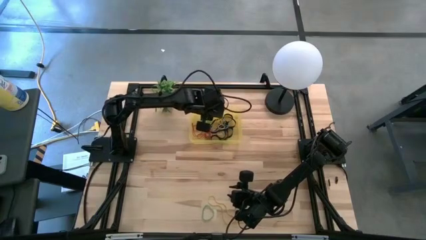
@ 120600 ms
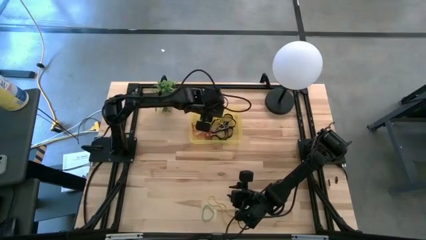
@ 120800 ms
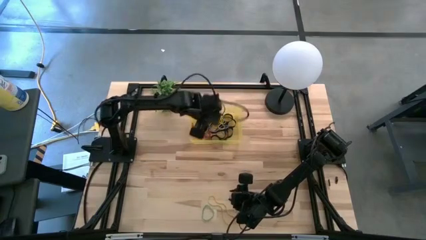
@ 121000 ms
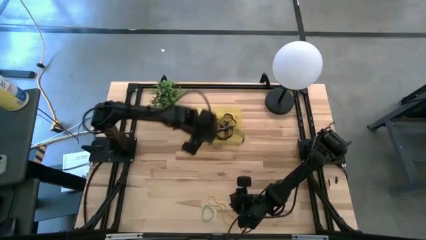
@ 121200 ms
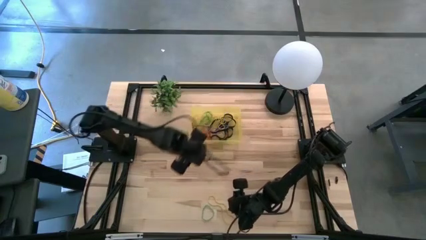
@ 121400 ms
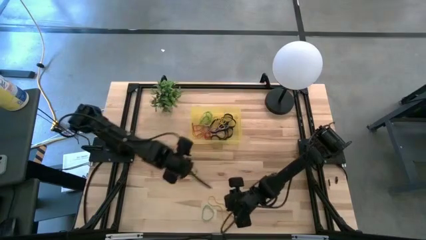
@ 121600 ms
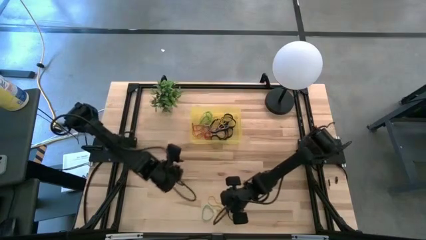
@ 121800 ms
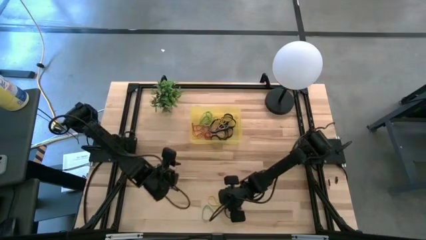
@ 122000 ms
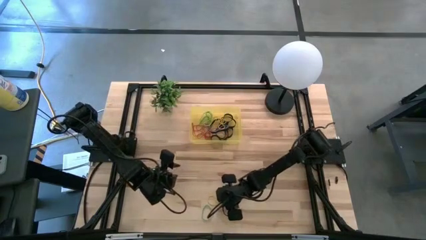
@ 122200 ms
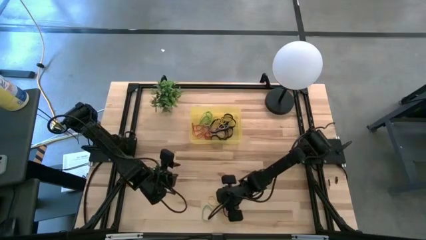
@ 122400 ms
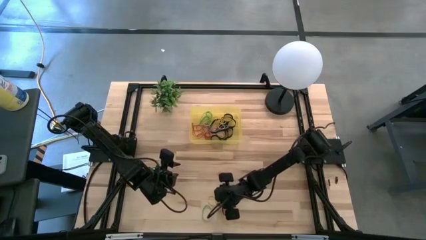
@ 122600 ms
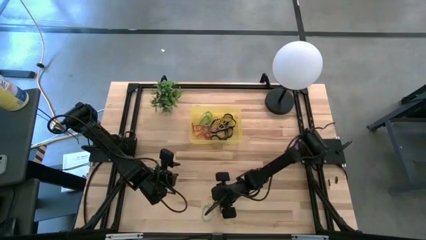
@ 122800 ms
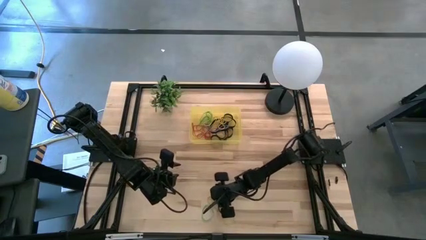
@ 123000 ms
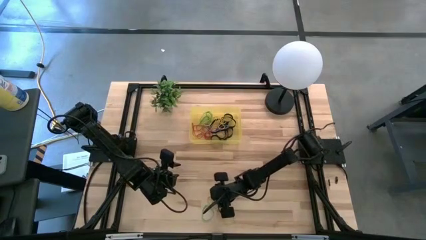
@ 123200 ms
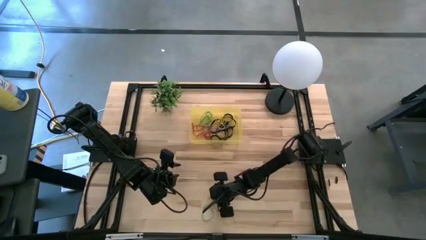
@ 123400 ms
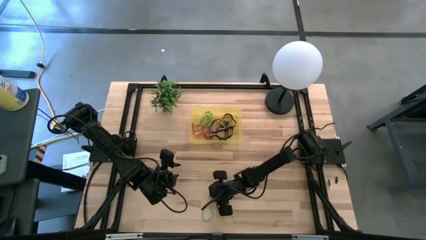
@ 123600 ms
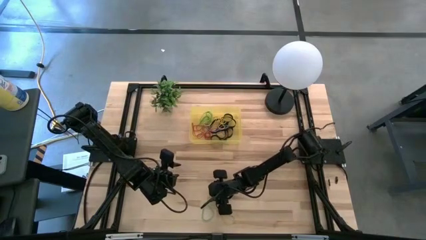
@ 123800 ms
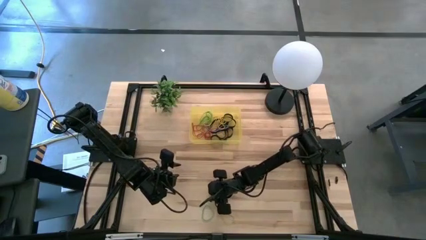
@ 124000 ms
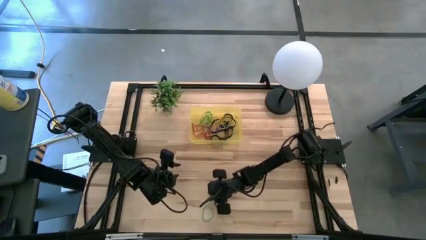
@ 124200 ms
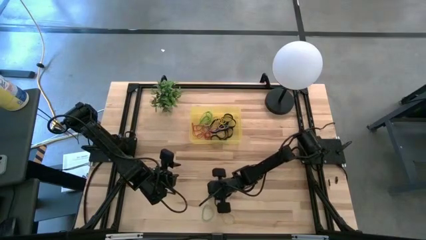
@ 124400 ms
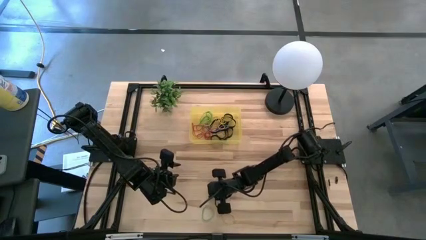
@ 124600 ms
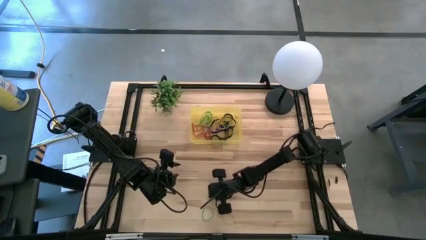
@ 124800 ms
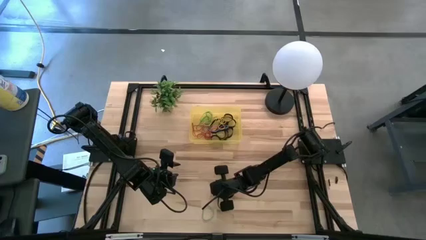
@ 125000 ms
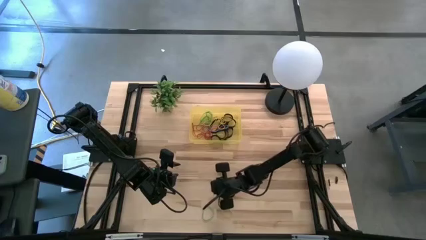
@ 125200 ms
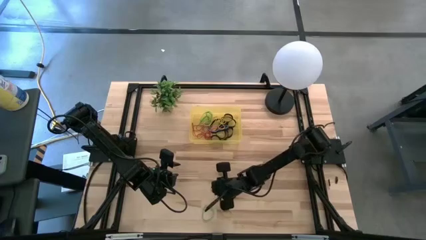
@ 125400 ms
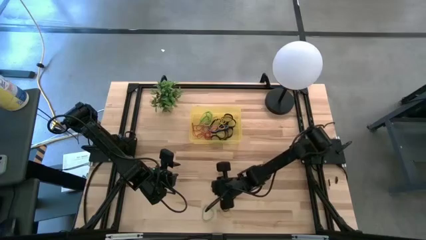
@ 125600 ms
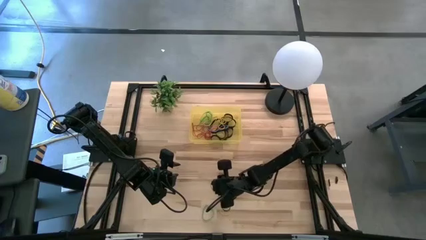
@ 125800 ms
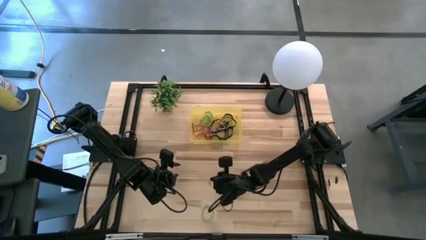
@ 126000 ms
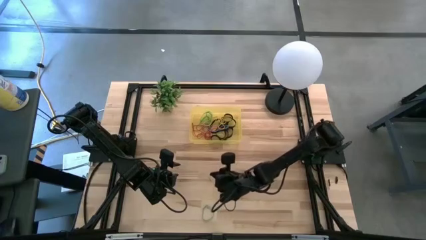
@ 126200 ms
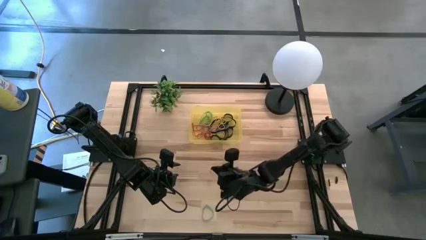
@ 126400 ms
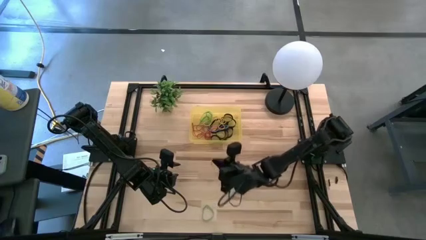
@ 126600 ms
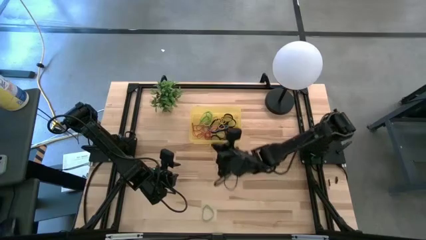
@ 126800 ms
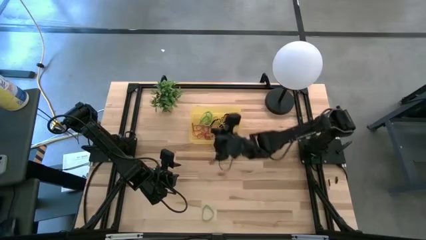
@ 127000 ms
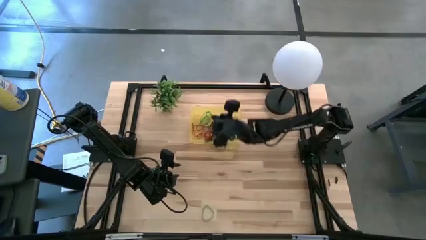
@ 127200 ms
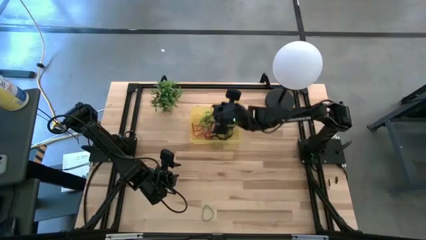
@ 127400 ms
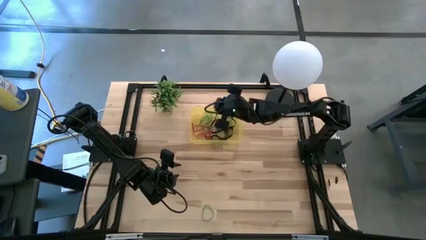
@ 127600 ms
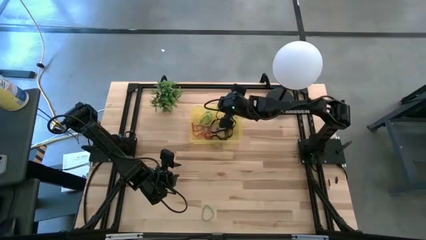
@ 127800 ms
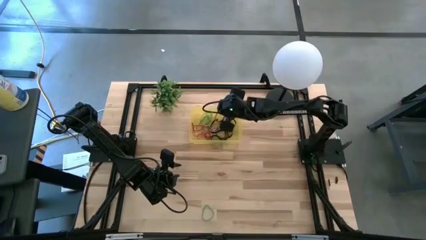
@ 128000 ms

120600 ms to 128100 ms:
Task: Pick and place rubber bands into bin
Put the yellow rubber band into the yellow bin

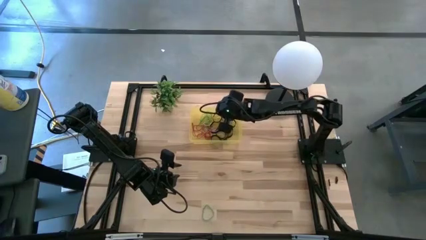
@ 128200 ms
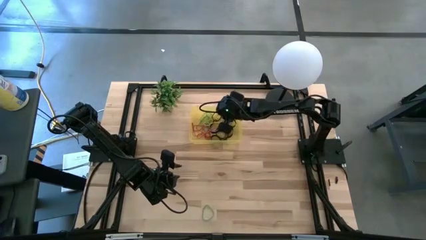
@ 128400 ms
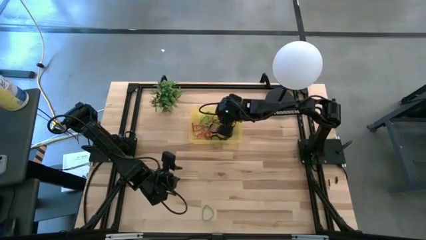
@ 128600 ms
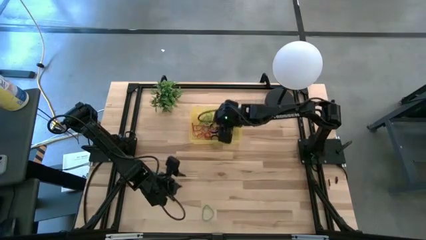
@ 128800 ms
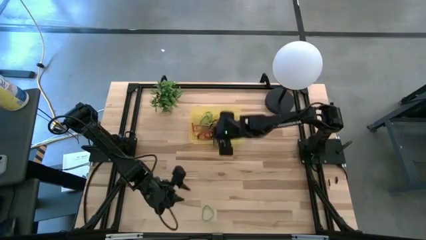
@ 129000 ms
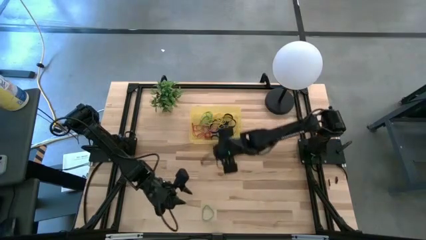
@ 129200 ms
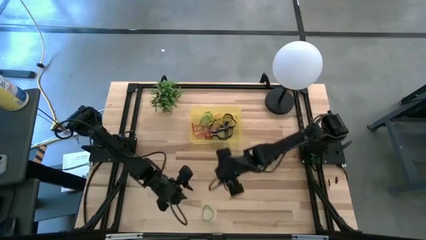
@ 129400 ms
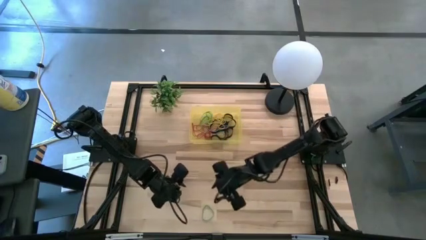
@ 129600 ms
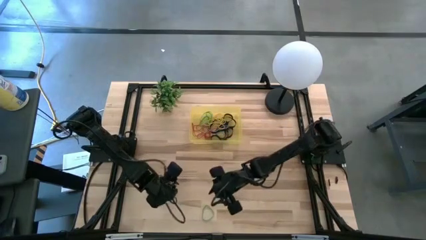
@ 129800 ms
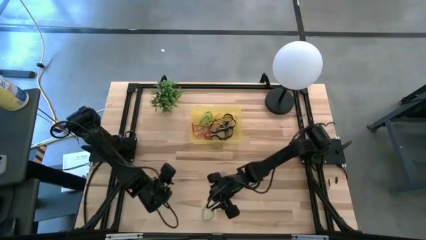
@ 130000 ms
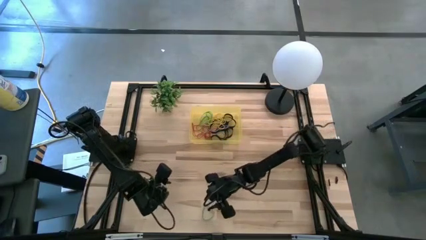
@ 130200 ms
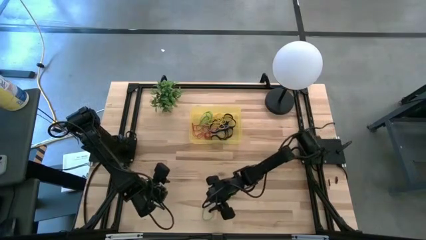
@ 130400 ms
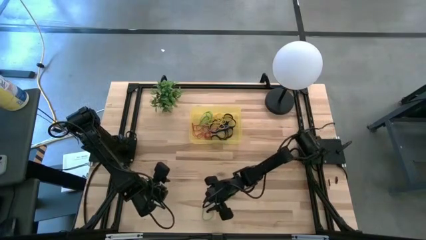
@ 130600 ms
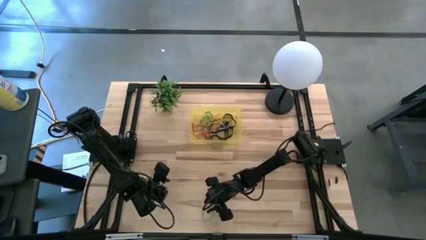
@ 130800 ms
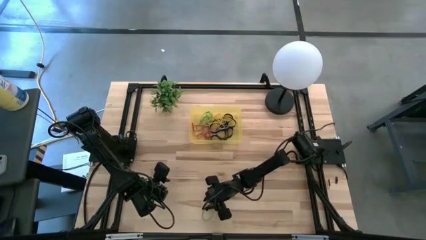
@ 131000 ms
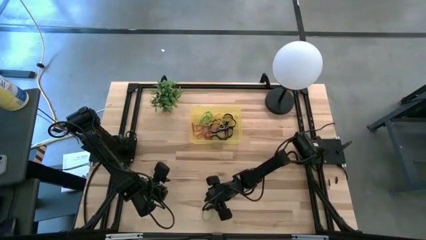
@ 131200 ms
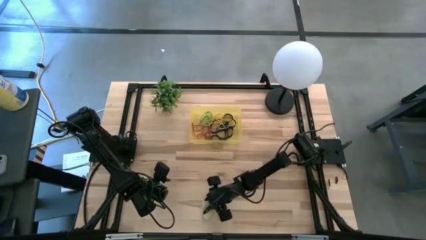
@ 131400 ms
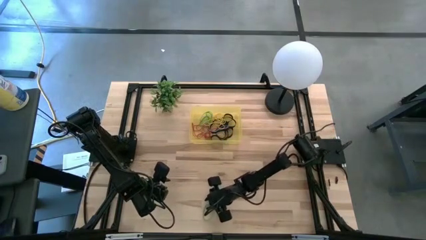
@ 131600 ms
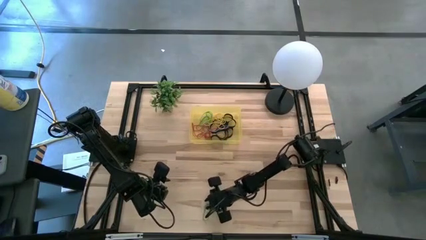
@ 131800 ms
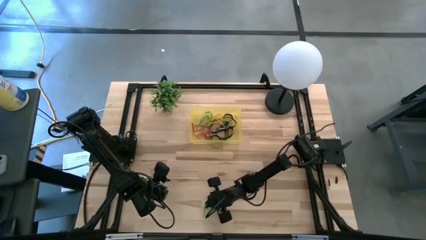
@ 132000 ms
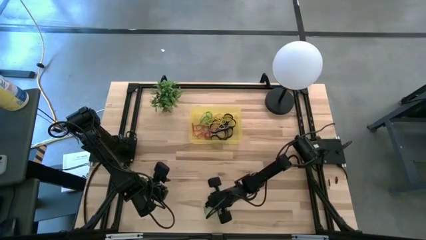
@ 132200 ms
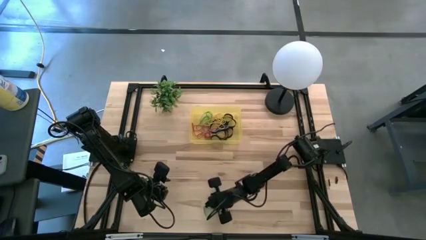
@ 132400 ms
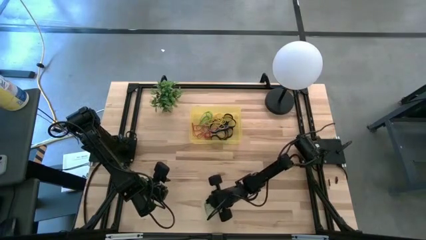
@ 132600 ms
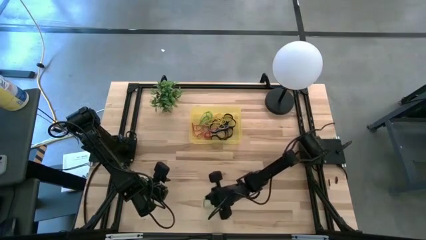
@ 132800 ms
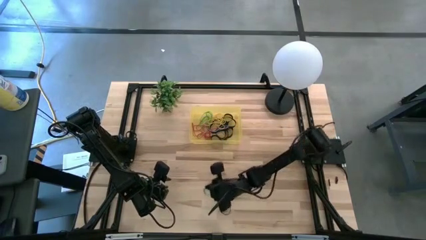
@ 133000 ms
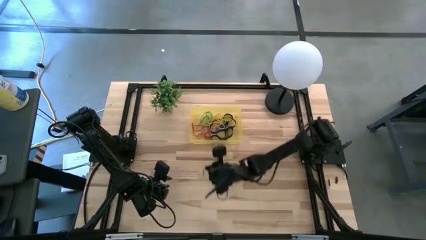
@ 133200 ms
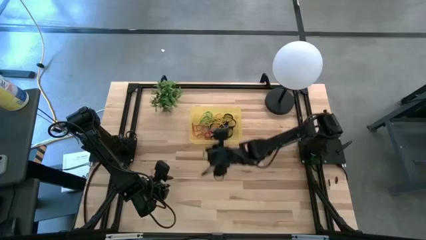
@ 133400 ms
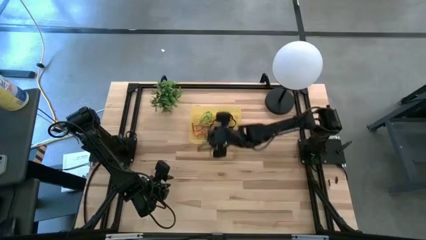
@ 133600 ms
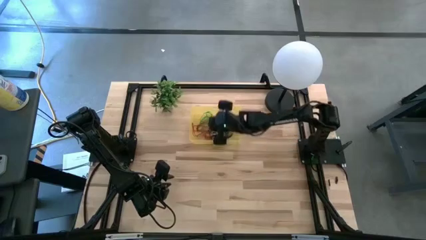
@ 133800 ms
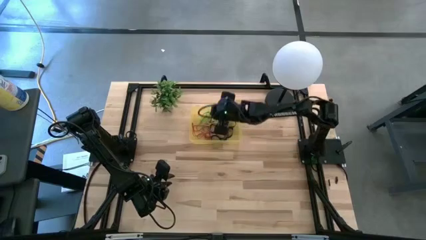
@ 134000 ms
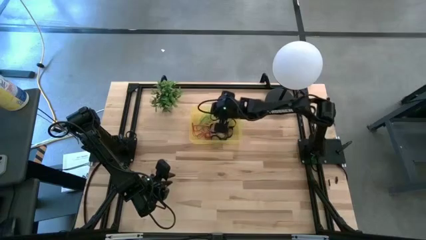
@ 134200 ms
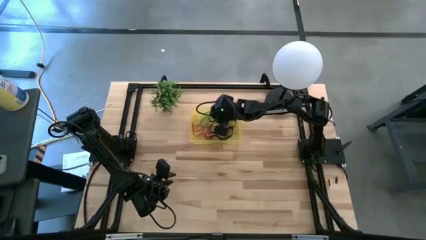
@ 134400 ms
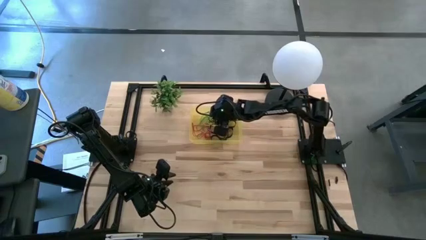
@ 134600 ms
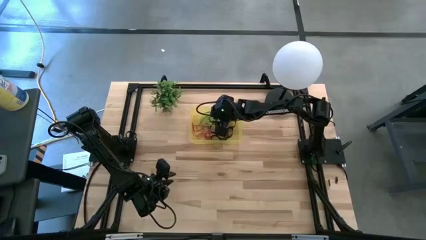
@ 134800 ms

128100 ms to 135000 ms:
Put the green rubber band into the yellow bin

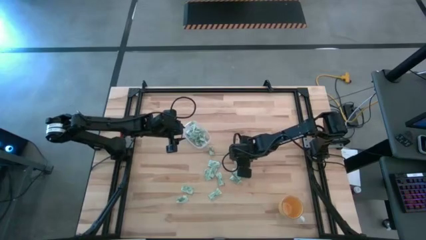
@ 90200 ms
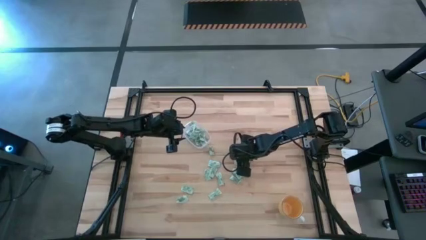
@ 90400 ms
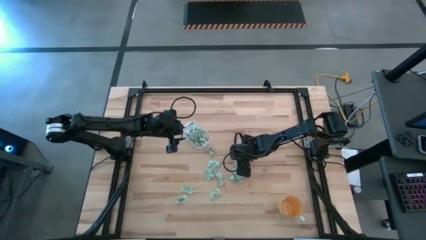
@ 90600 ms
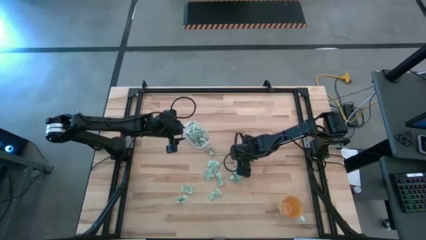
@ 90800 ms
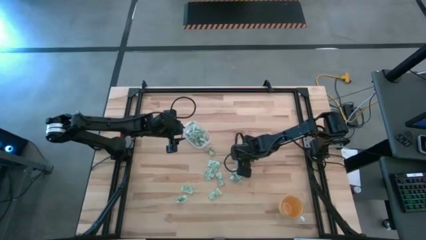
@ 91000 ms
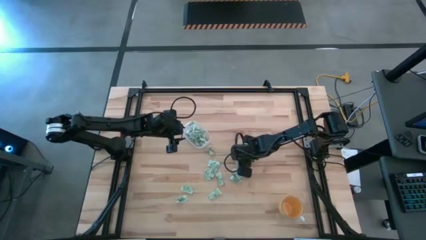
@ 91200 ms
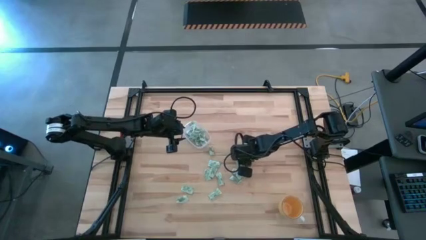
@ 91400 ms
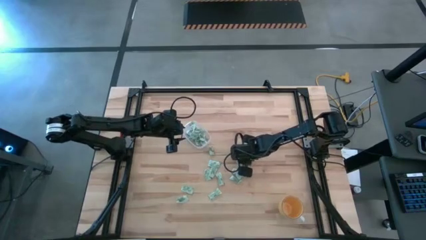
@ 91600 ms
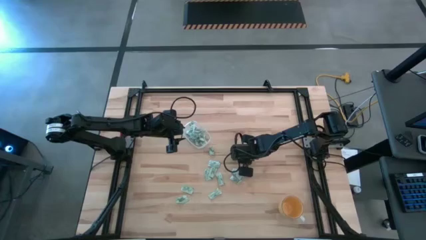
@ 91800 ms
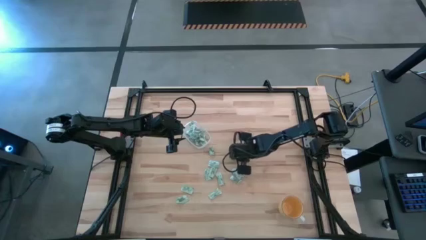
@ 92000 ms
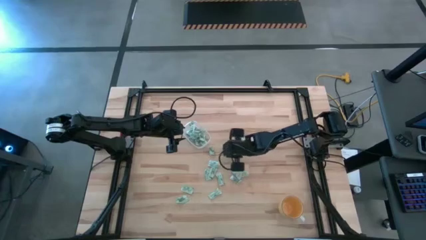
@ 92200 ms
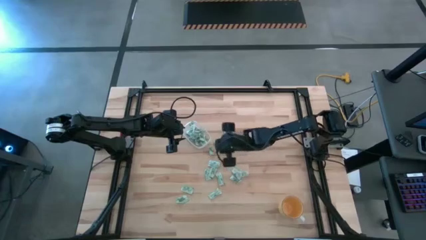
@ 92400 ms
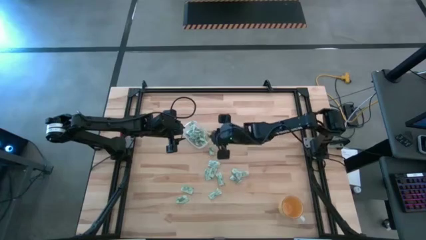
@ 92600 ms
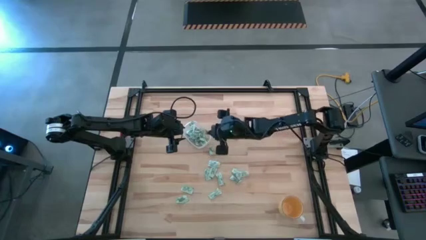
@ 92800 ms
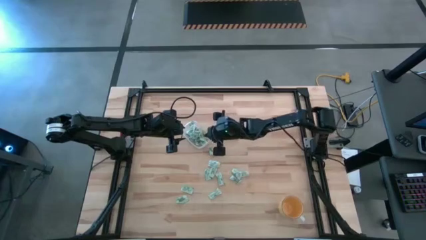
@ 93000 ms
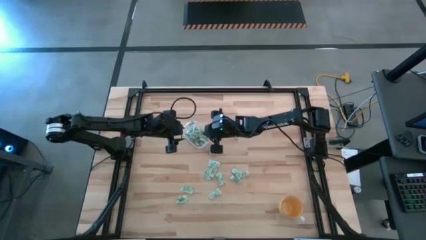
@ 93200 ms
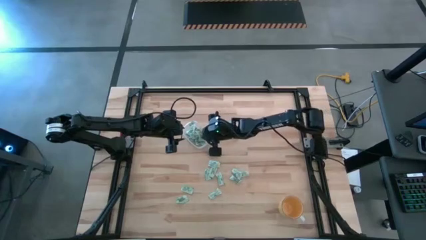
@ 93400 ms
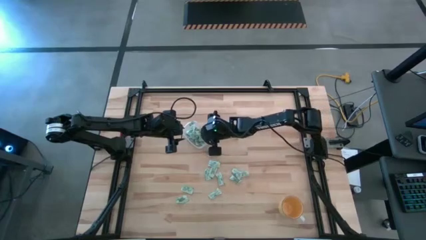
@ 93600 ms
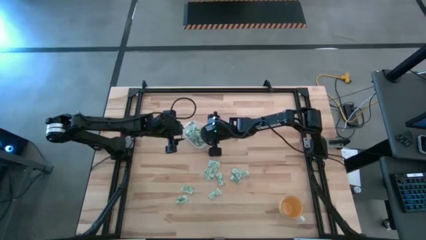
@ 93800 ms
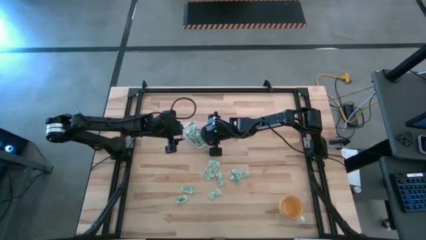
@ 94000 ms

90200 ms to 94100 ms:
Task: Pick and place Stevia / Truvia into bins
Put the stevia packet into the transparent bin
